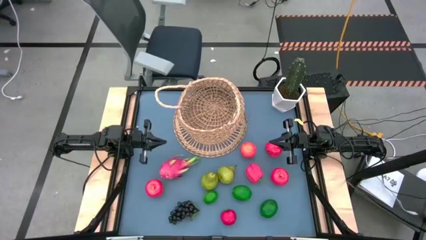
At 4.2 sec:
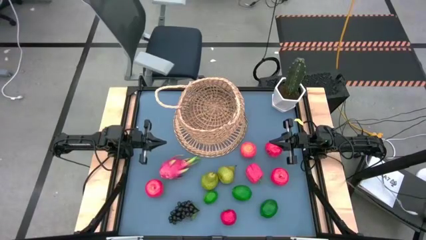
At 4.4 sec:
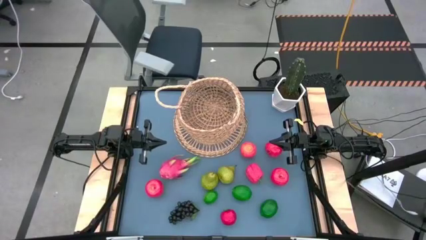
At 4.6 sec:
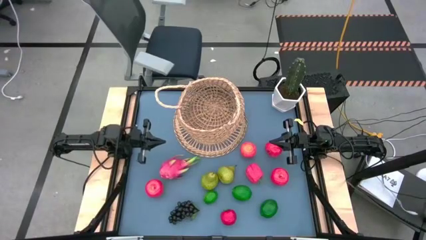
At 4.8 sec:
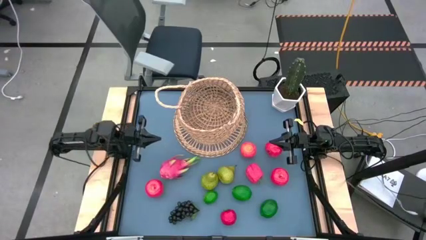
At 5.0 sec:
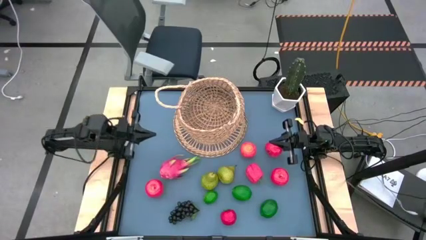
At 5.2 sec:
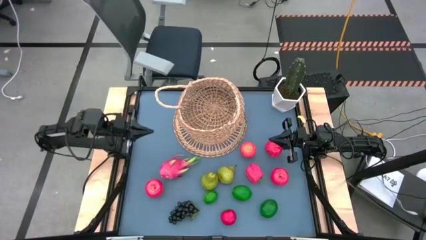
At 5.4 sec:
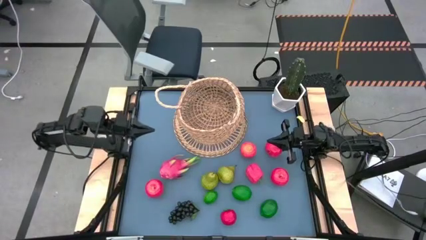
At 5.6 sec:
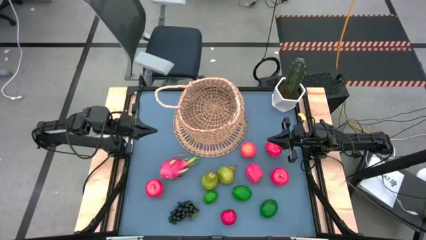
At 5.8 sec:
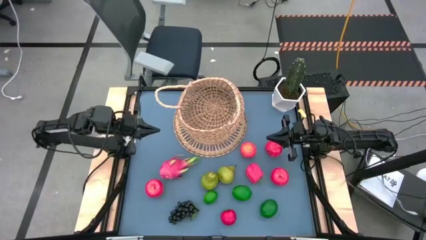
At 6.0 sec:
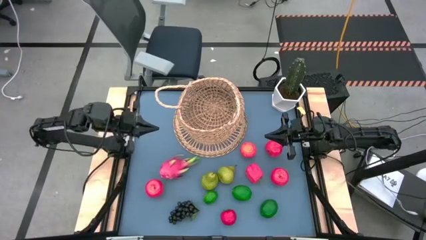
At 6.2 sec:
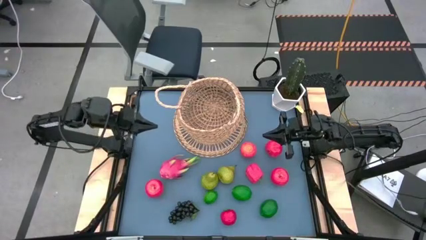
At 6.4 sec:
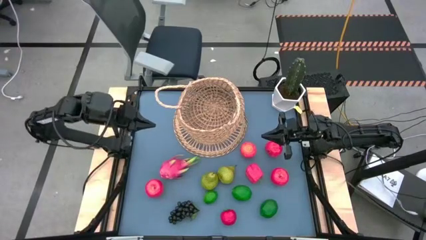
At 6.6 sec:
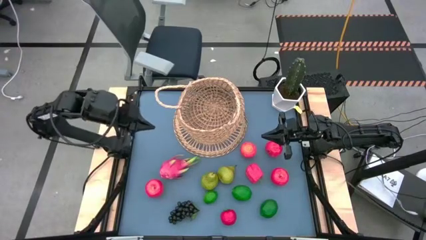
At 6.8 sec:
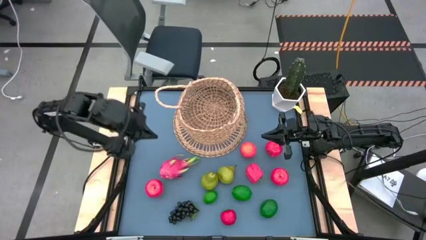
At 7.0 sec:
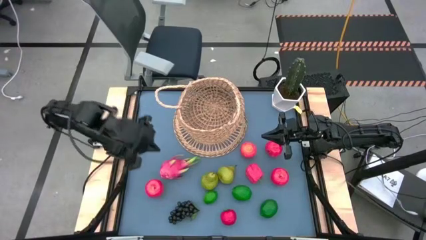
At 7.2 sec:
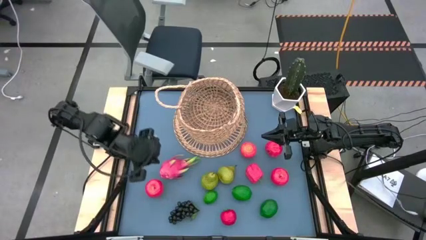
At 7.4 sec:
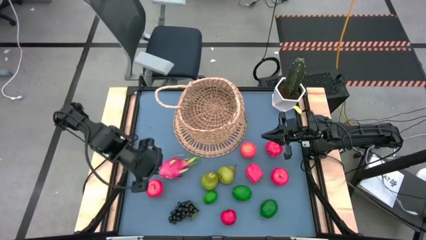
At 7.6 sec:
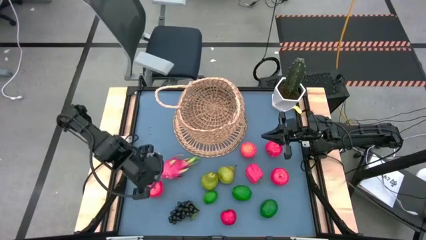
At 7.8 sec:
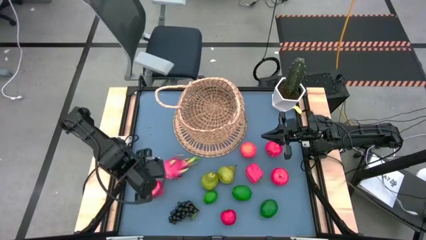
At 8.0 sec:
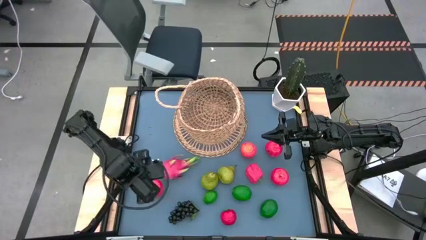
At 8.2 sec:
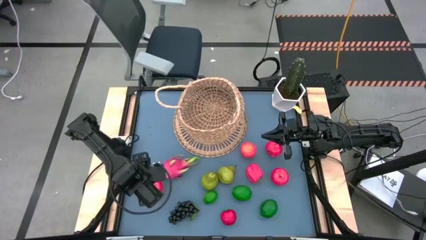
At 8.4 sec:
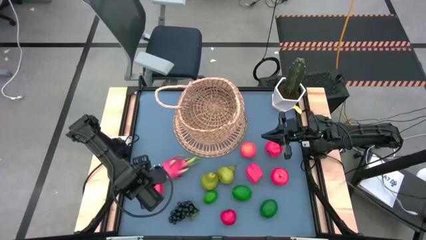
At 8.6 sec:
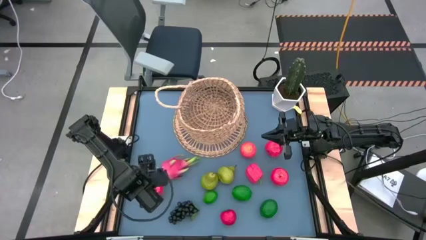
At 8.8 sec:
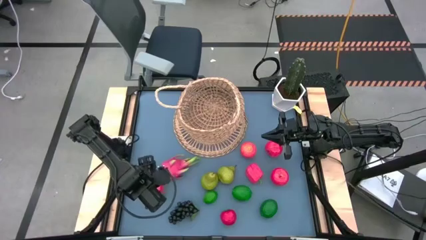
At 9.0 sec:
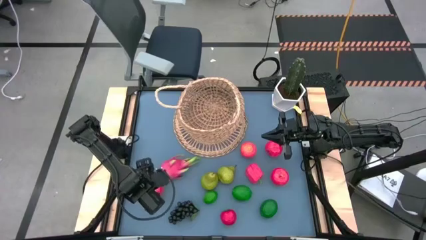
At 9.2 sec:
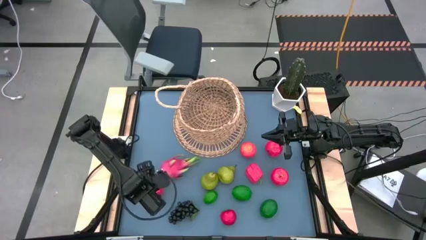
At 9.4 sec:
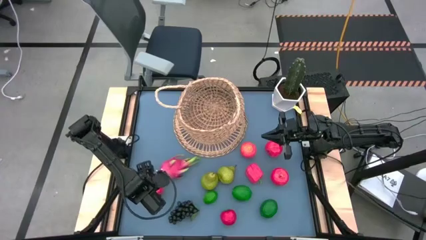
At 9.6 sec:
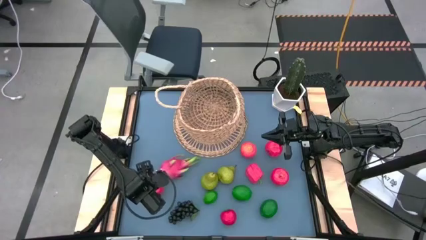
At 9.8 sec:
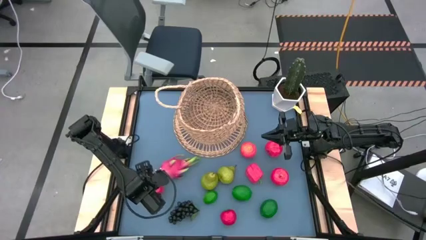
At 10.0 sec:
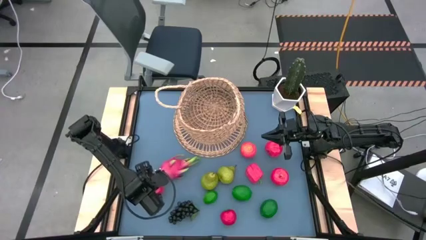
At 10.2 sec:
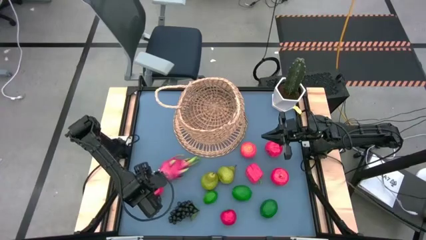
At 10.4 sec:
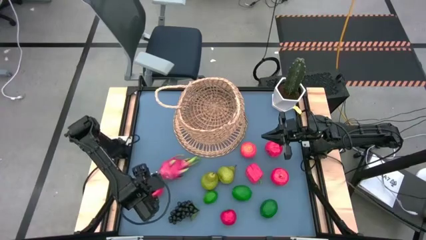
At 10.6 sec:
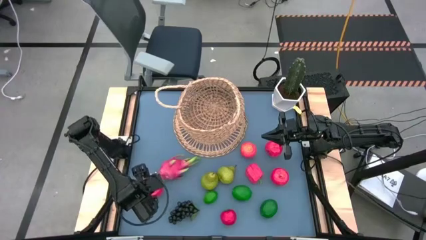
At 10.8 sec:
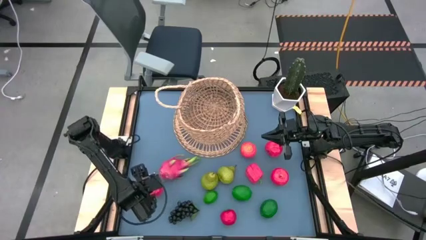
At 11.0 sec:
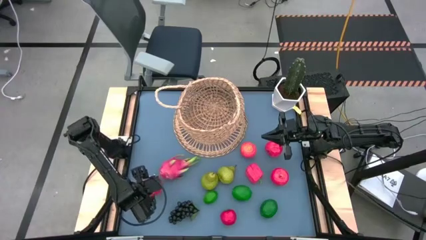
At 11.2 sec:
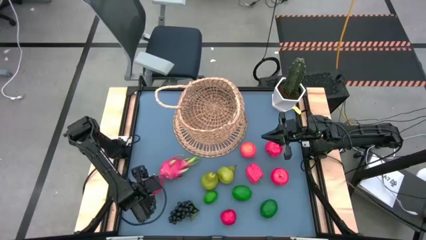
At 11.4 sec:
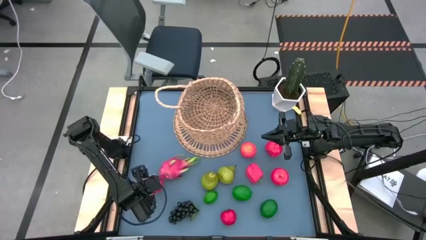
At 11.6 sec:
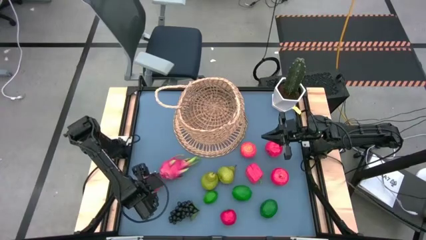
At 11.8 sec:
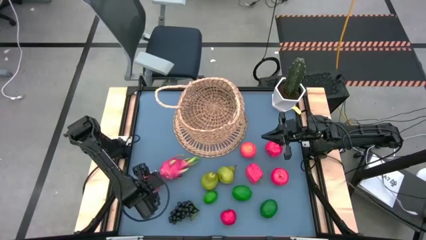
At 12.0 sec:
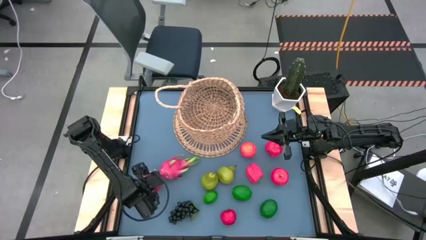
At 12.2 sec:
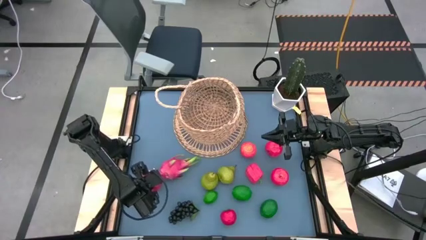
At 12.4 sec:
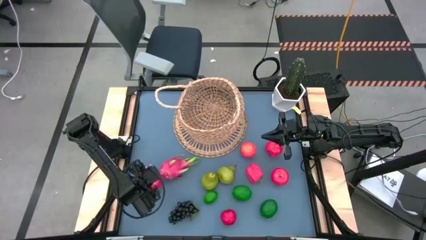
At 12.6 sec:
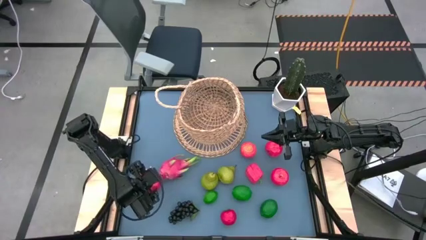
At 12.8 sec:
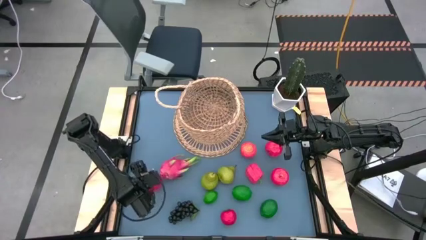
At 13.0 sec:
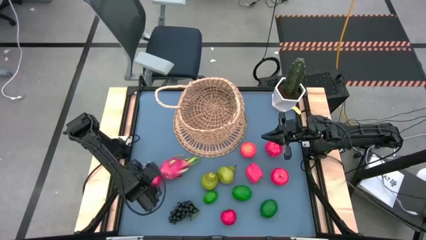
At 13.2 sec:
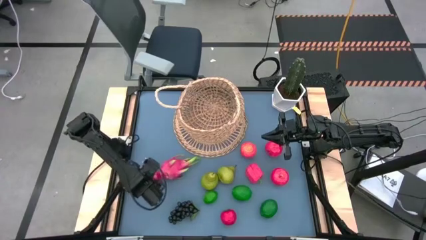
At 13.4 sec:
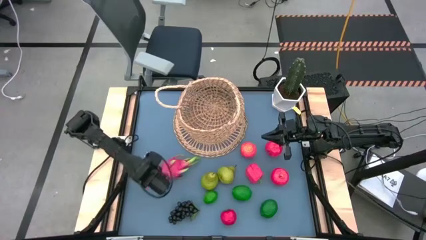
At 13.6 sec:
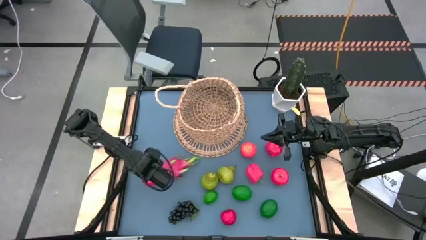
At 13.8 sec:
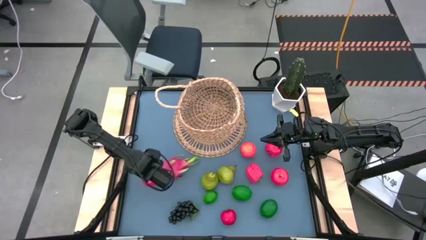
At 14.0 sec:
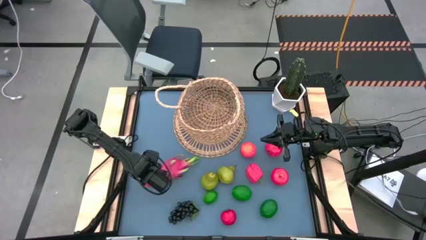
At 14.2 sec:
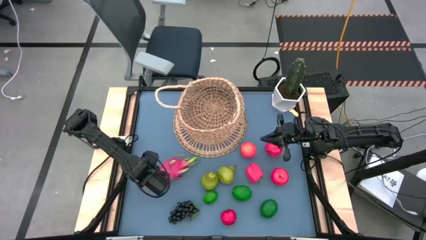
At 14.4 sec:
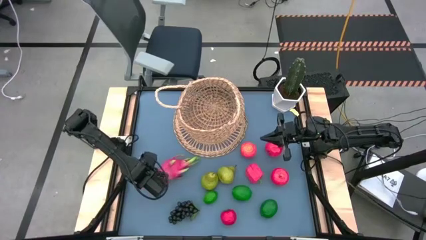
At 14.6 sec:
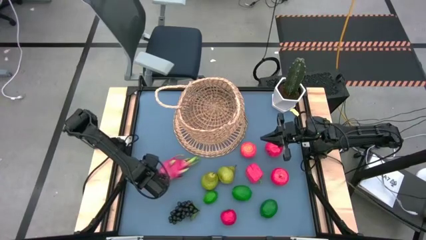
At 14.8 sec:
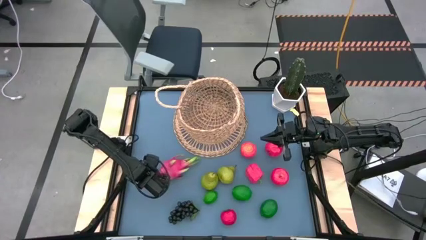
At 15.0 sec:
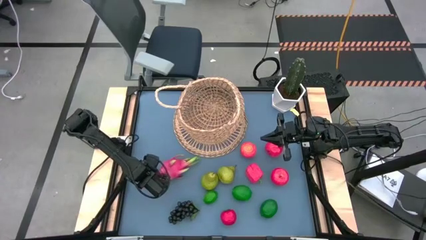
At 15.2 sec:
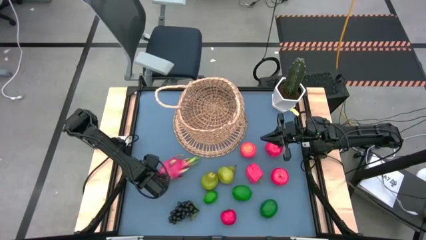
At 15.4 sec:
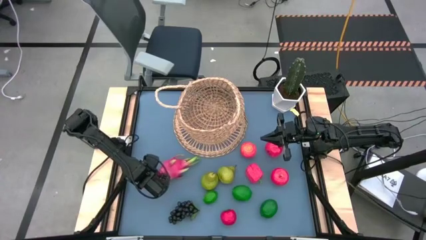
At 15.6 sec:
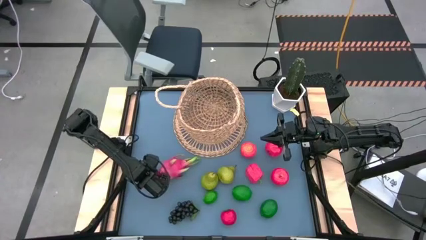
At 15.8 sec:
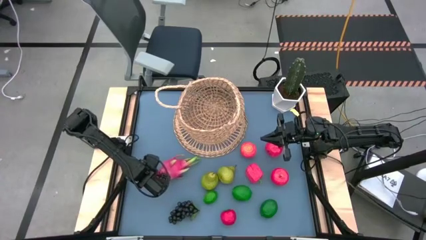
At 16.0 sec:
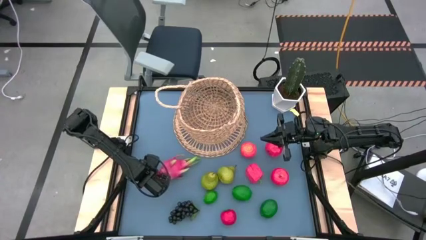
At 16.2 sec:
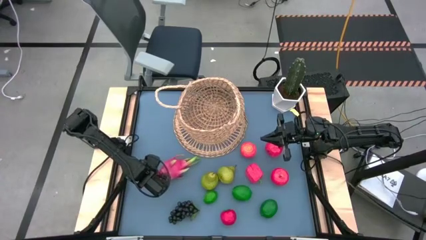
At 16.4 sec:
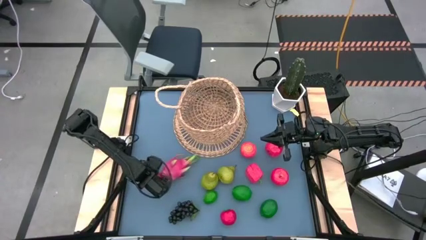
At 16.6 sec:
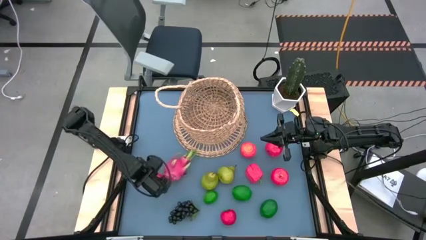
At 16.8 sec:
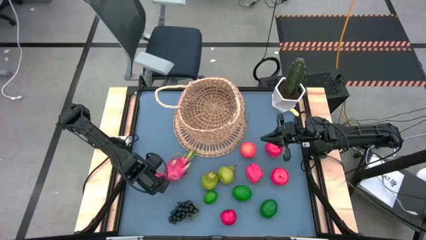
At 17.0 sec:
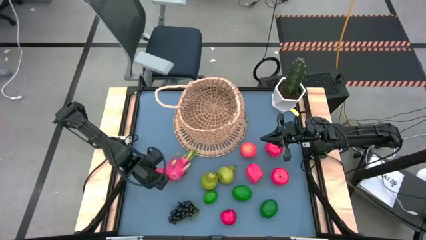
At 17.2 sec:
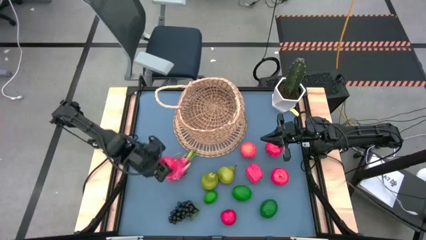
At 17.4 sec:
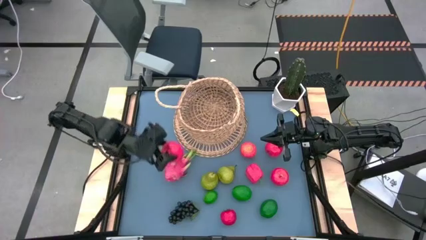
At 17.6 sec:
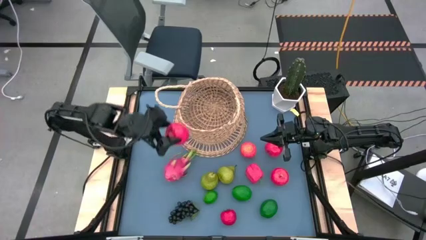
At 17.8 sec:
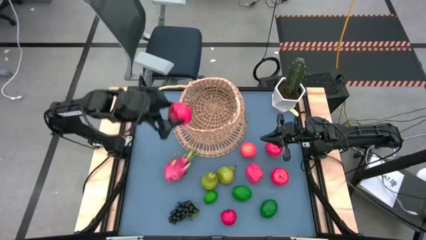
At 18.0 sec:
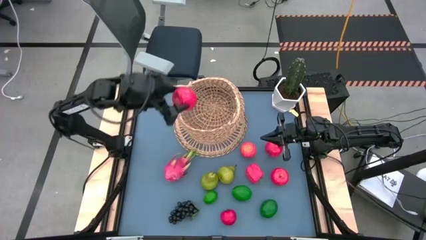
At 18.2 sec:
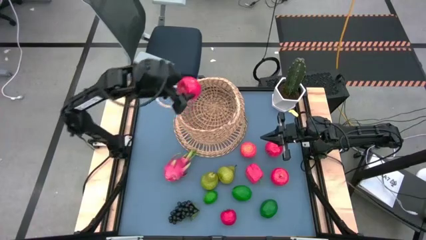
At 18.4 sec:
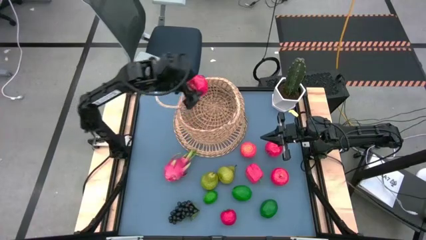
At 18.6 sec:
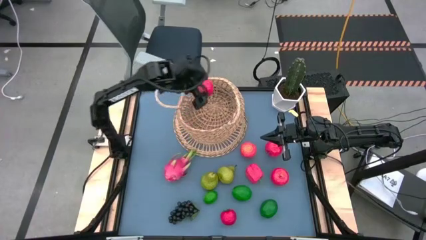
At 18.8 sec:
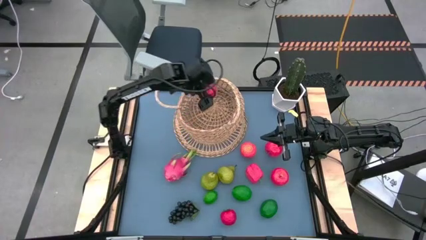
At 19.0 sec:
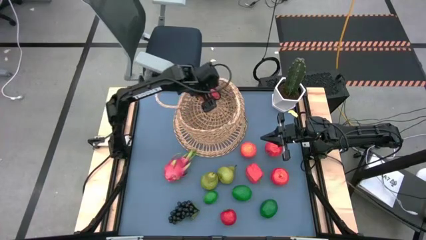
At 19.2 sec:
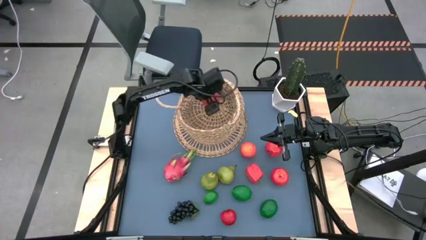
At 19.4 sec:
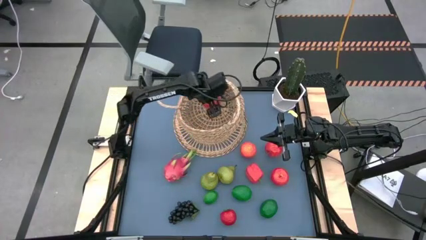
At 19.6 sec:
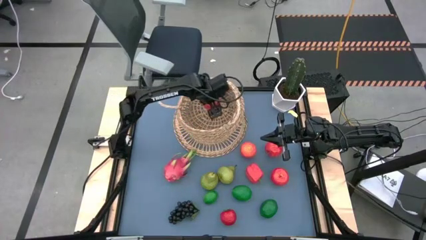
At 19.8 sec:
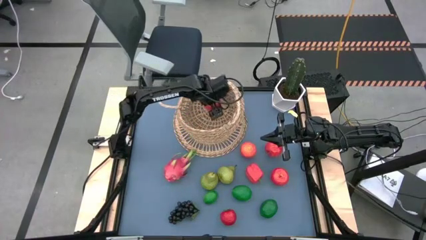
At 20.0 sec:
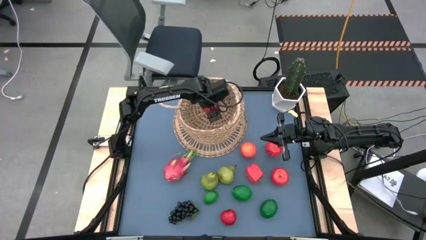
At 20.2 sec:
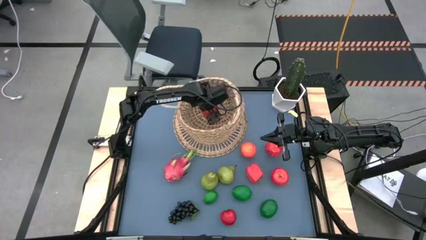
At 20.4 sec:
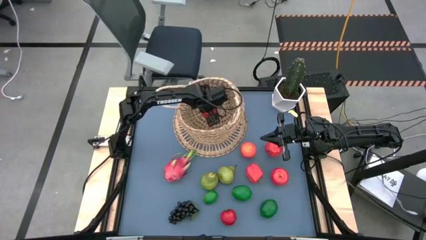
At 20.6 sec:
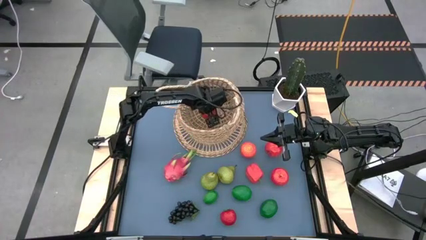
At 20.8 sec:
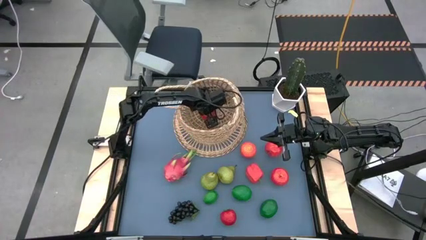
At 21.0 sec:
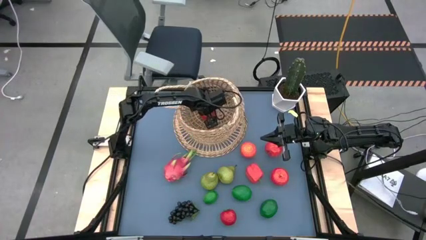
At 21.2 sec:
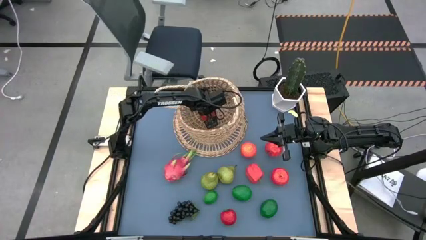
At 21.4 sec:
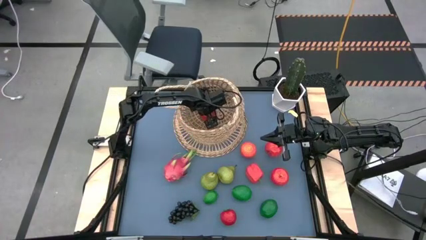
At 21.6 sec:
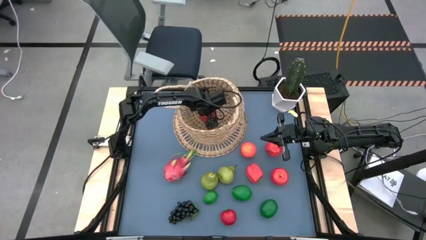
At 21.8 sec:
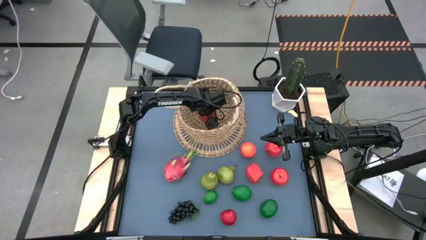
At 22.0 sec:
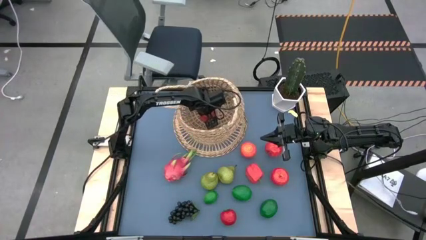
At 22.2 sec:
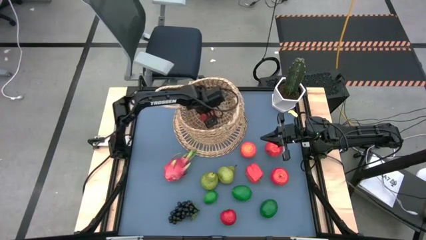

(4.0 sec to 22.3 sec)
Task: Build produce basket
Put the apple into the basket
